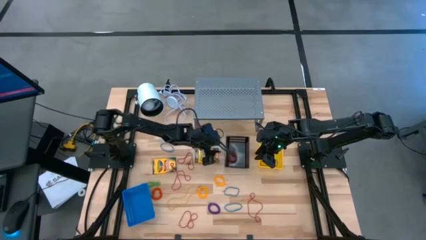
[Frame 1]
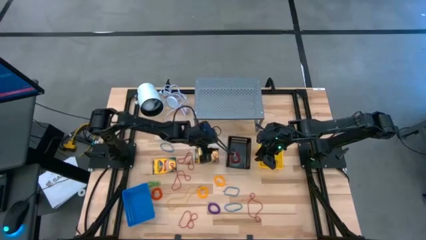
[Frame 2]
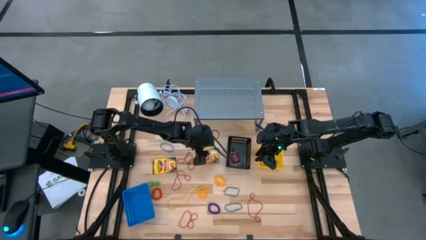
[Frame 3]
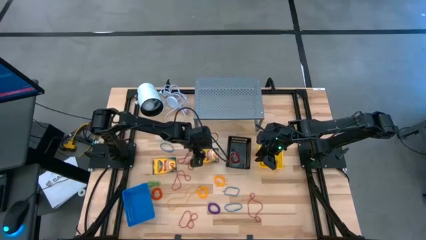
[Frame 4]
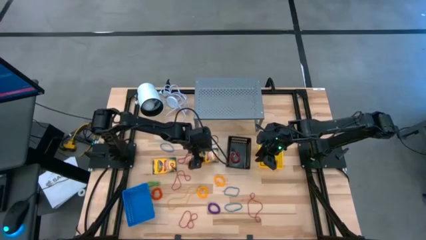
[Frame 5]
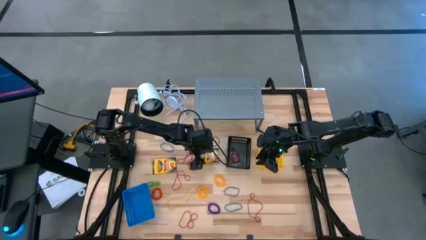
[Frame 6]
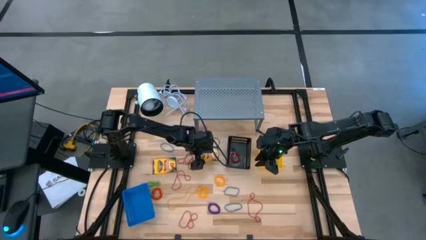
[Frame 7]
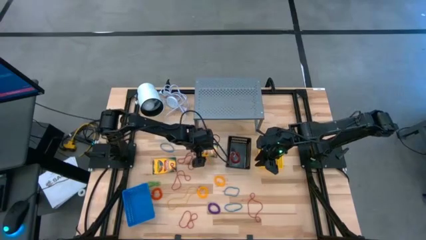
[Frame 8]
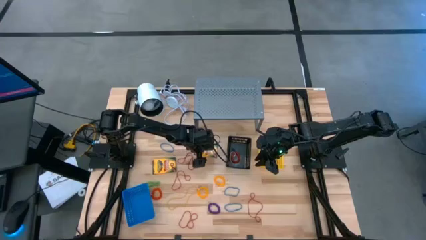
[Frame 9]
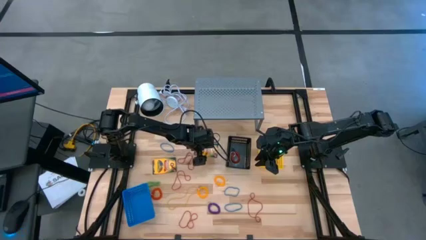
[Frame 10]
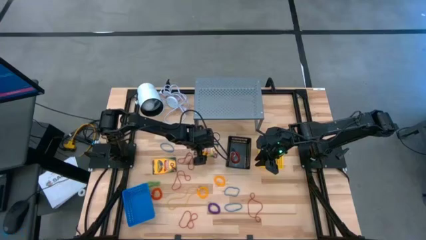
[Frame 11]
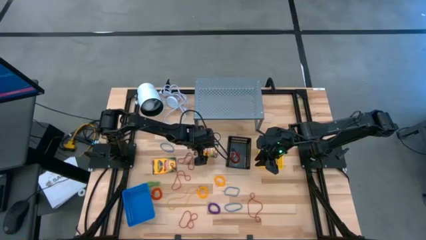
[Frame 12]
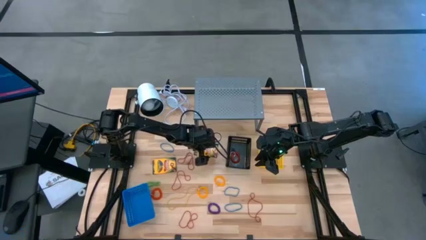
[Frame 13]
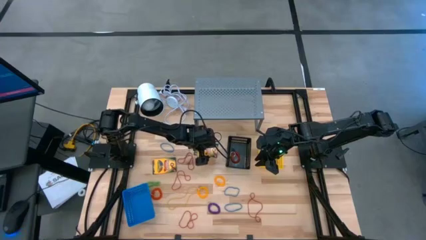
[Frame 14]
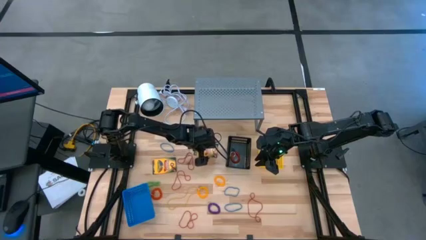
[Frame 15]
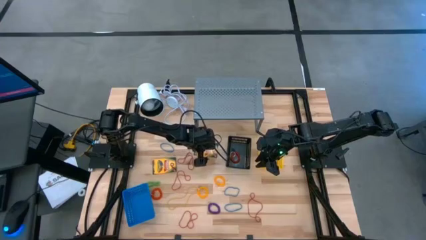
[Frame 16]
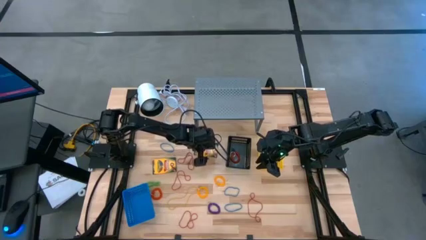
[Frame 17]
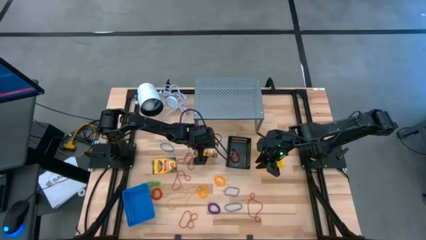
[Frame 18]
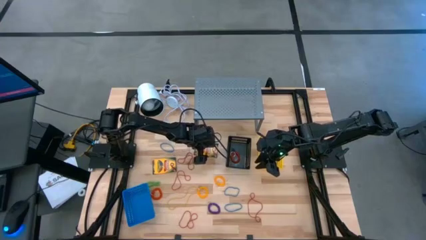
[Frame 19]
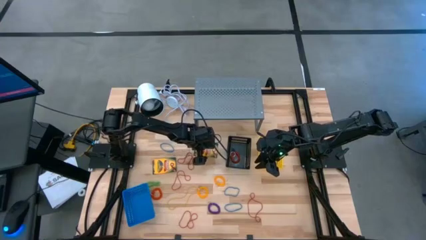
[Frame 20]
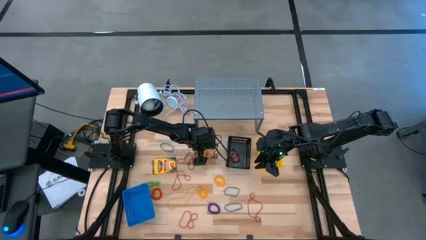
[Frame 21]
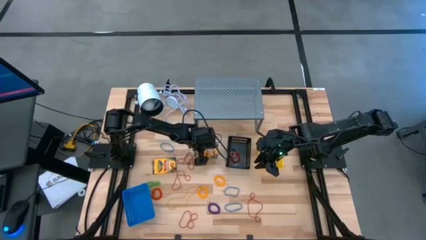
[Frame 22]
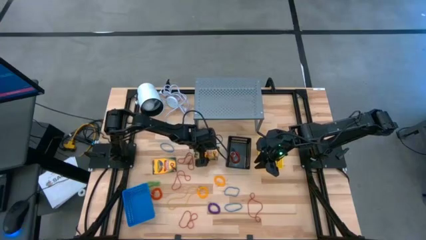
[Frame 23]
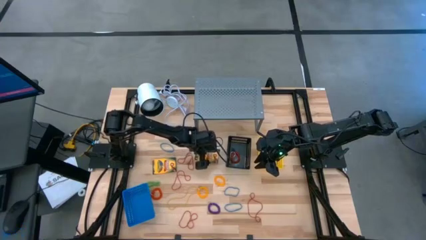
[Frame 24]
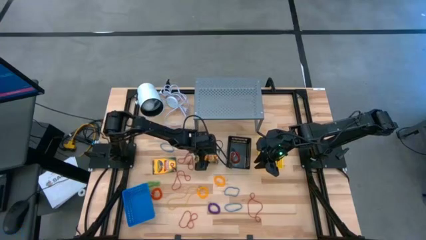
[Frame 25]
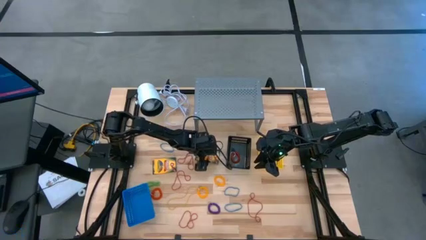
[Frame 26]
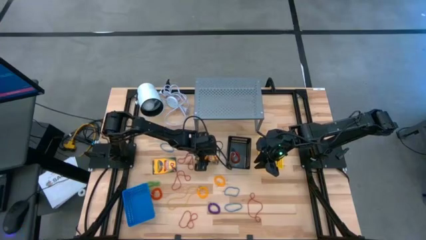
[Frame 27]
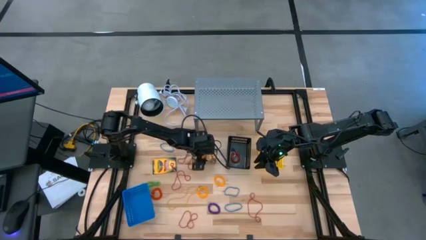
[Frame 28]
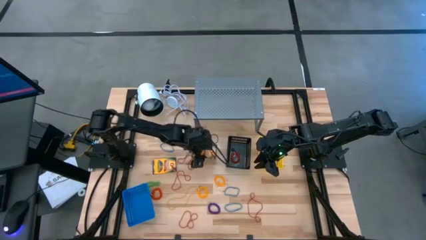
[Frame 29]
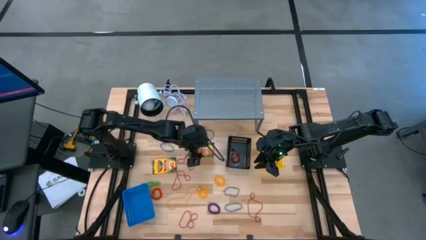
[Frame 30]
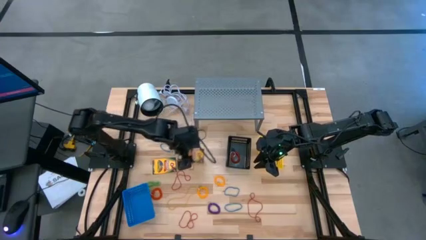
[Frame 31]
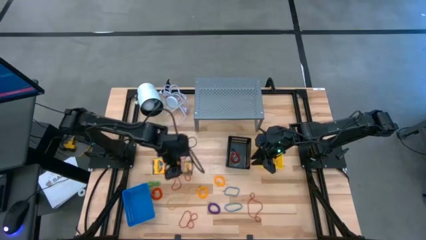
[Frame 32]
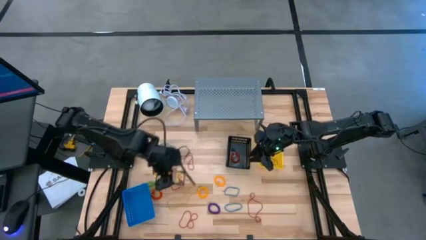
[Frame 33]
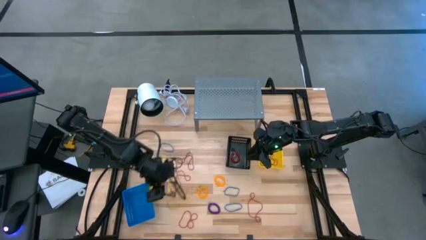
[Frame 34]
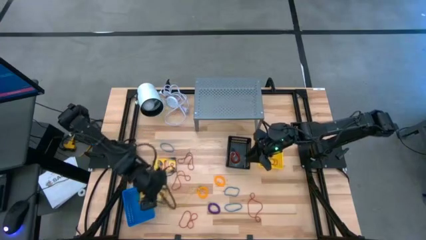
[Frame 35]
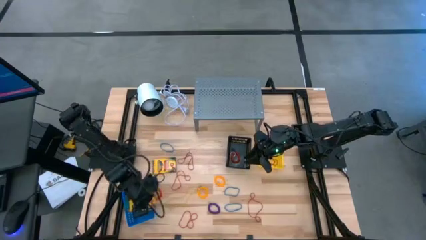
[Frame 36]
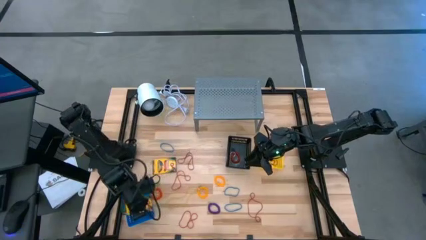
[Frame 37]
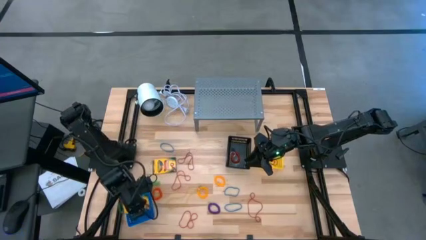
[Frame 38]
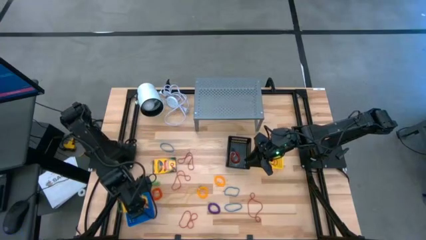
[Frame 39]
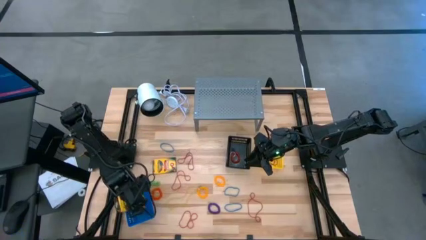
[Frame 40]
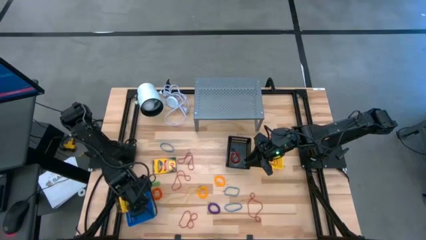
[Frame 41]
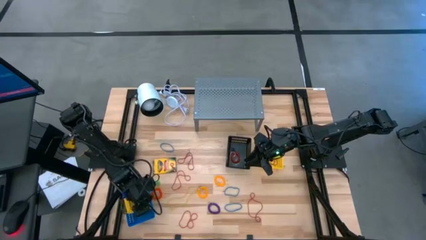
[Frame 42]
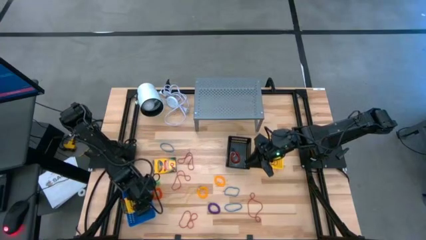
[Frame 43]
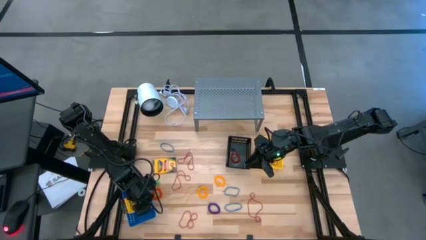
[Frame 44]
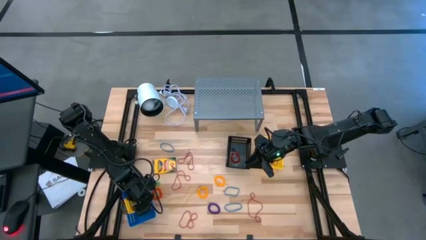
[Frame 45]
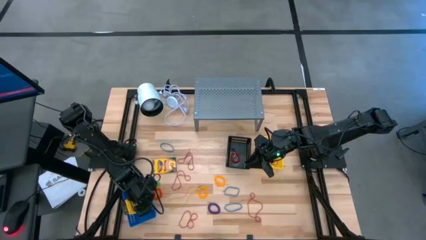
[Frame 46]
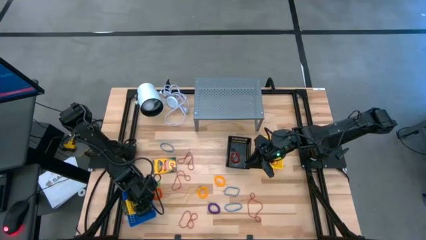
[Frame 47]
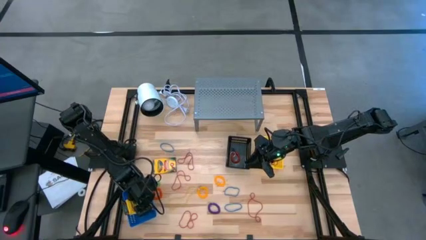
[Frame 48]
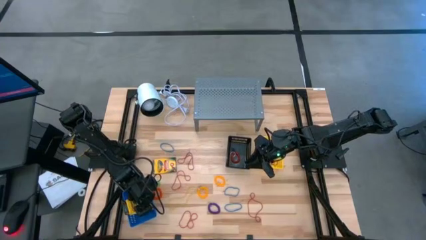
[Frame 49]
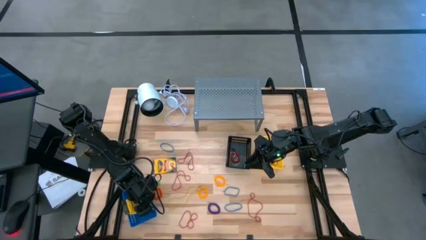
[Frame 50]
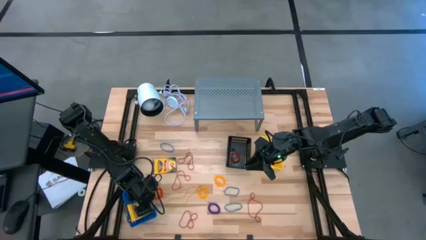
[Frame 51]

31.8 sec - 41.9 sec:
Task: Pick & Place Office Desk Supplies
Put the top crayon into the blue basket

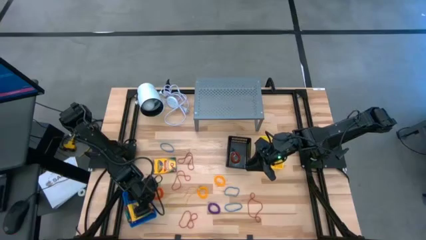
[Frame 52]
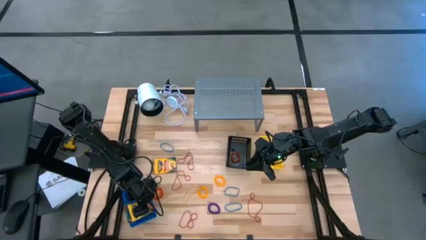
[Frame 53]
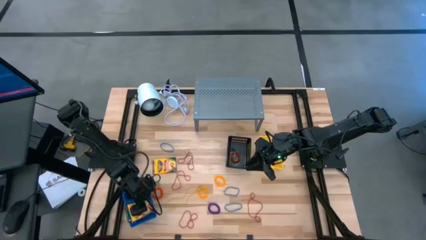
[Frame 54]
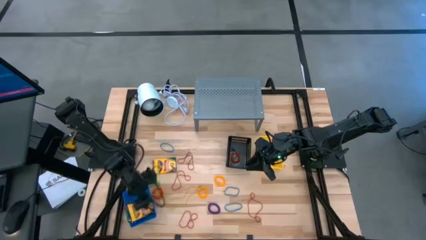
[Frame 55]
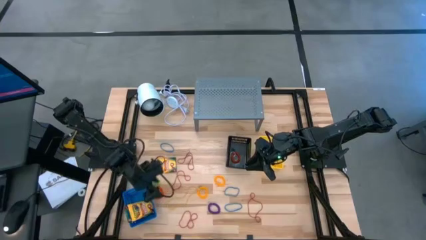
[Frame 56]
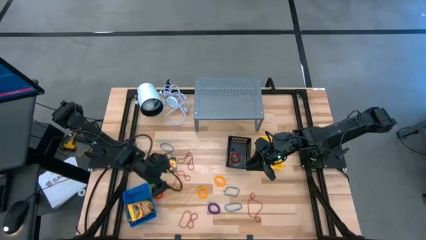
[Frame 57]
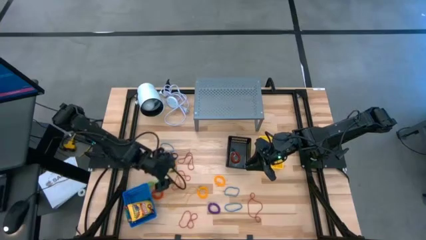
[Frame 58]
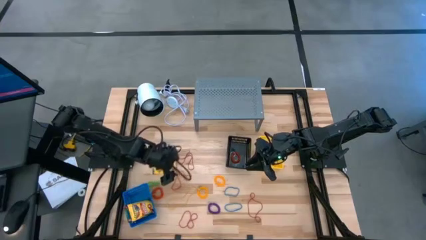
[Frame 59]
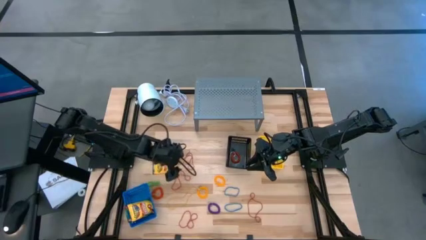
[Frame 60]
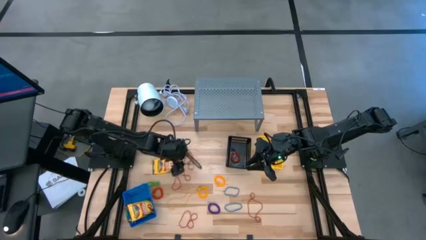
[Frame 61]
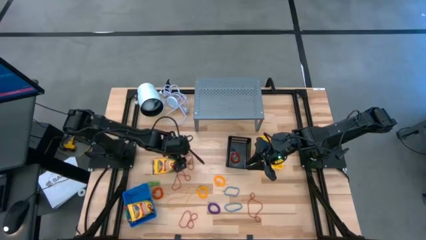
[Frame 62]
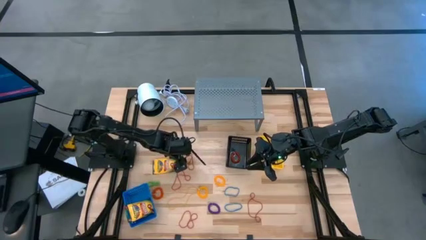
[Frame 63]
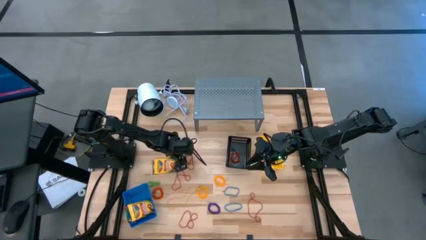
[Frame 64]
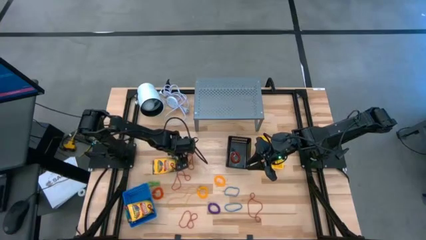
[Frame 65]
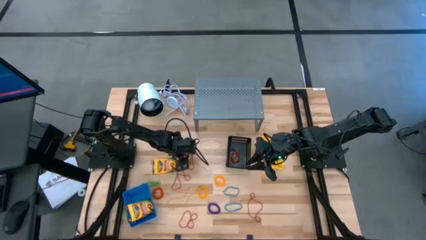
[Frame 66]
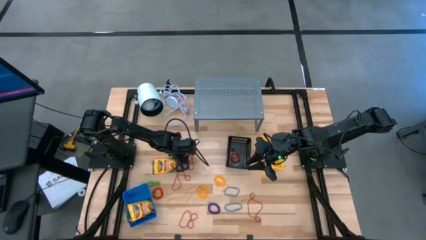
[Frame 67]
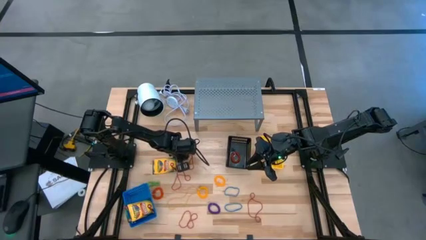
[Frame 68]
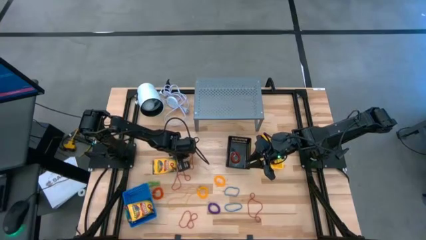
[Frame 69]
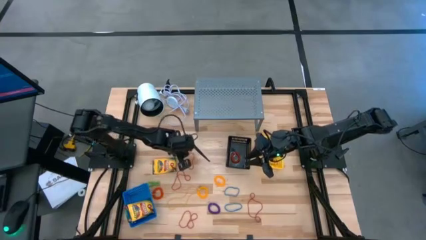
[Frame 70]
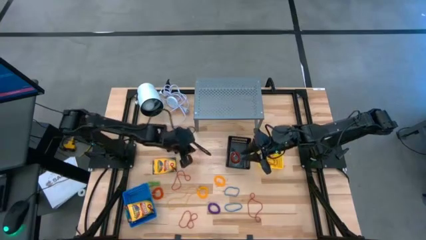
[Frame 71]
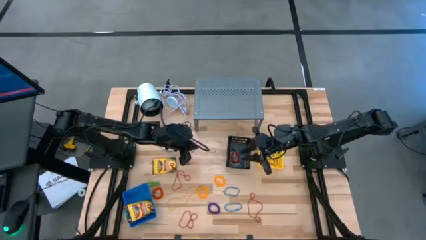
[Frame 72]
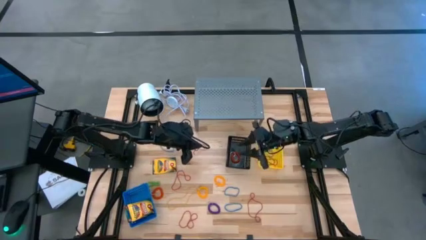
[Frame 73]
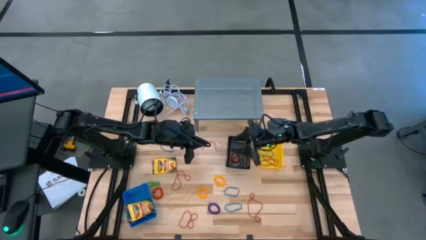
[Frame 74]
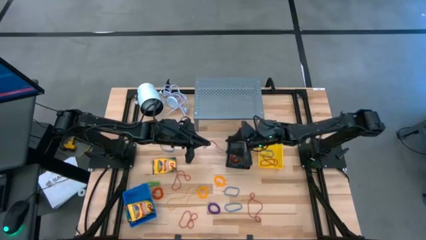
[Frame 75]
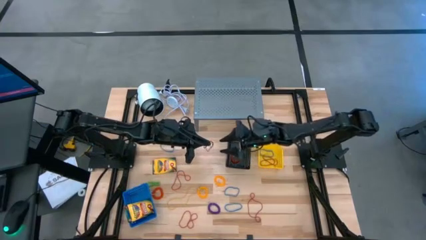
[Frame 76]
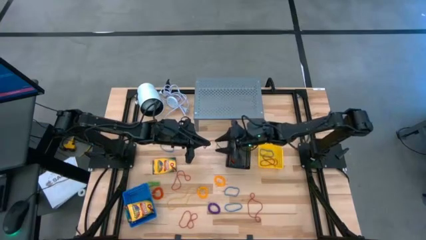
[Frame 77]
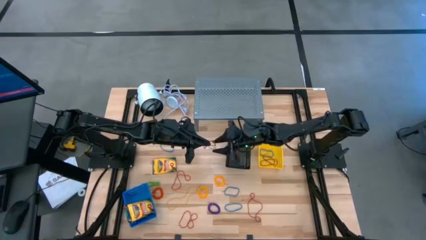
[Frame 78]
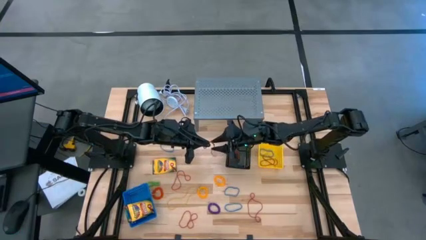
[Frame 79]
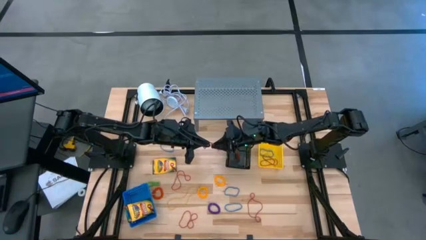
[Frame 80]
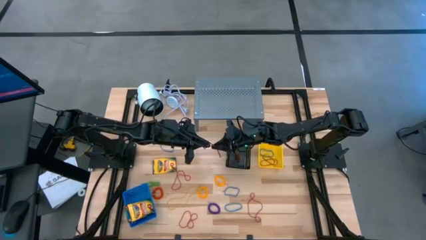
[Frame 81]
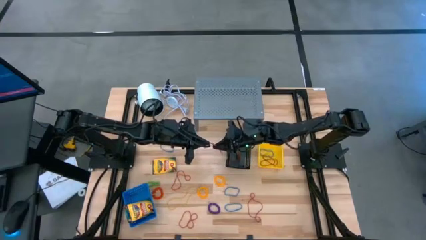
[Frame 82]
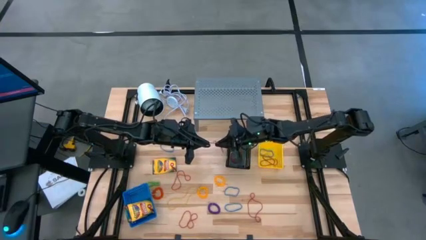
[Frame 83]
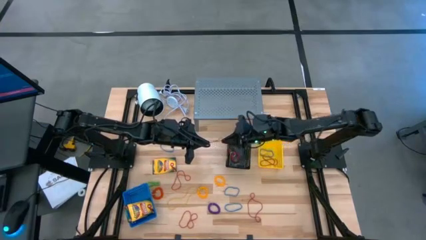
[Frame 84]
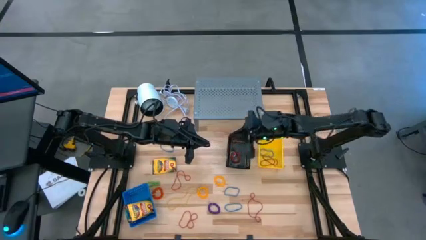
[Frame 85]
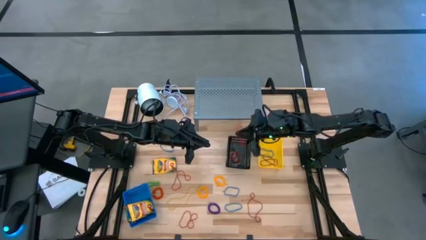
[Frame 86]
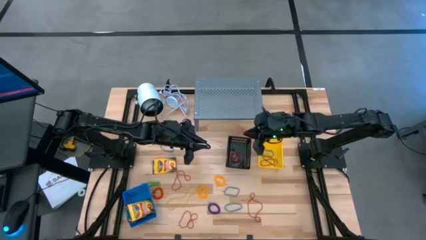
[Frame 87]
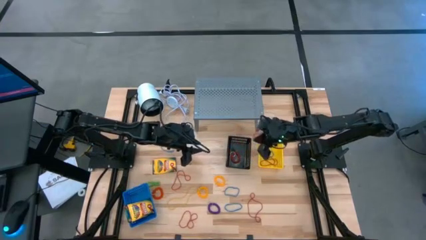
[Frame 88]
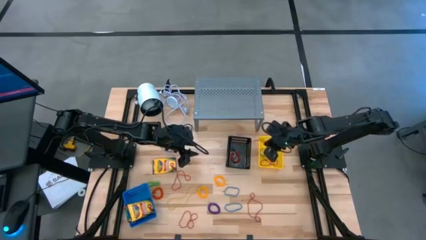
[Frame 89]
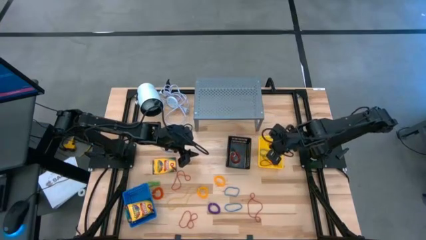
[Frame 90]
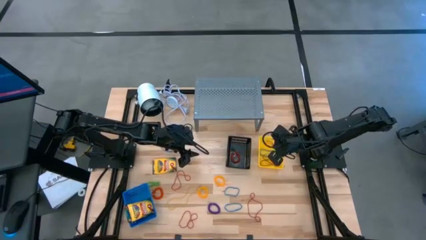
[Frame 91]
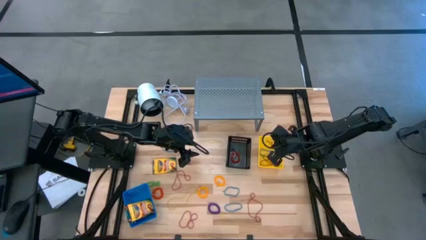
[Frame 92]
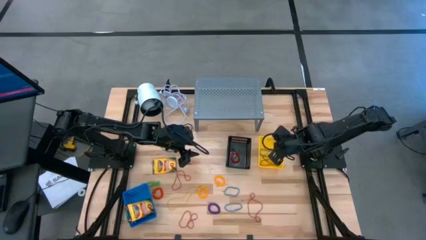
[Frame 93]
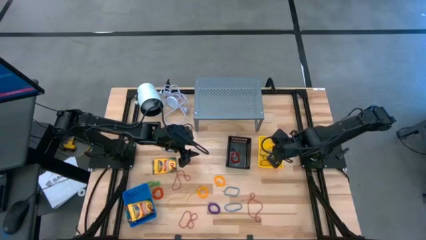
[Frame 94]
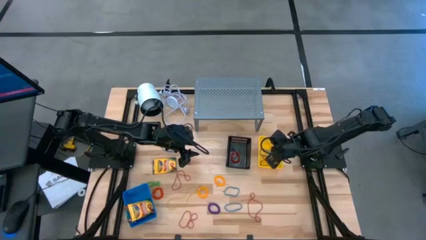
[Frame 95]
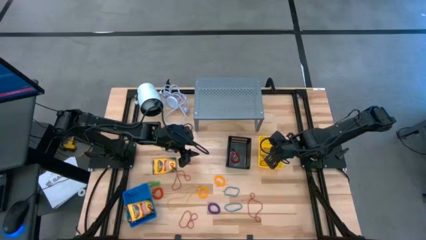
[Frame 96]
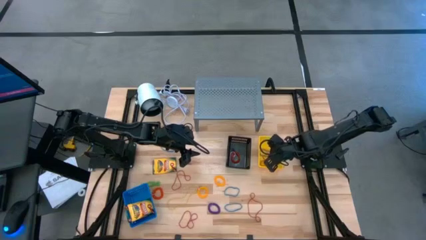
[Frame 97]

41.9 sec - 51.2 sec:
Put the red rubber band into the yellow basket
